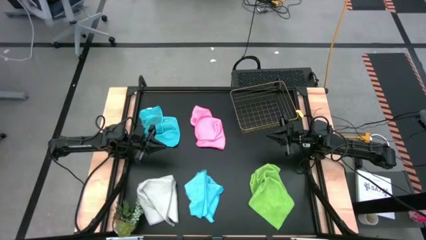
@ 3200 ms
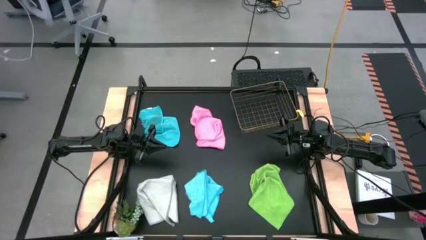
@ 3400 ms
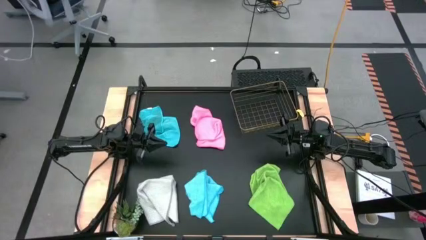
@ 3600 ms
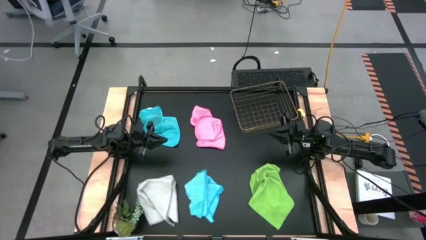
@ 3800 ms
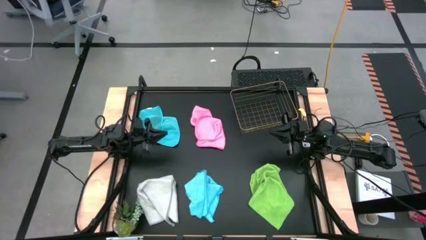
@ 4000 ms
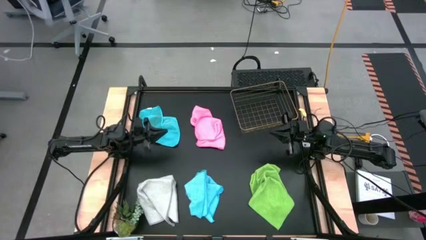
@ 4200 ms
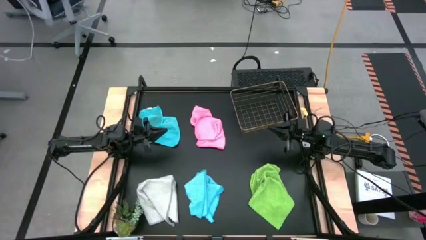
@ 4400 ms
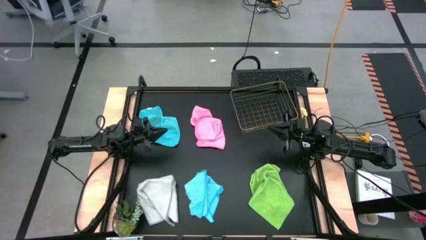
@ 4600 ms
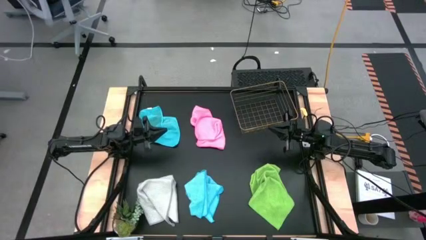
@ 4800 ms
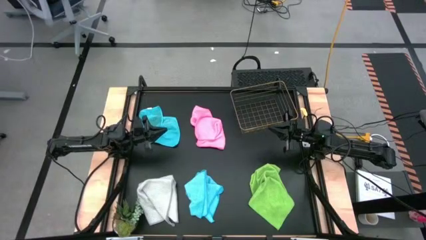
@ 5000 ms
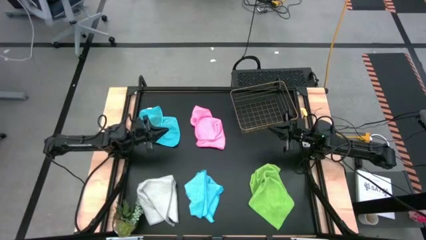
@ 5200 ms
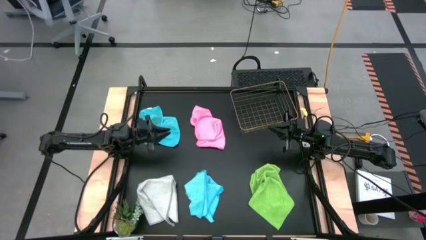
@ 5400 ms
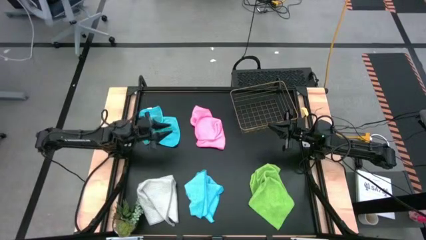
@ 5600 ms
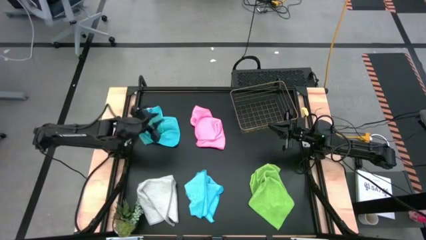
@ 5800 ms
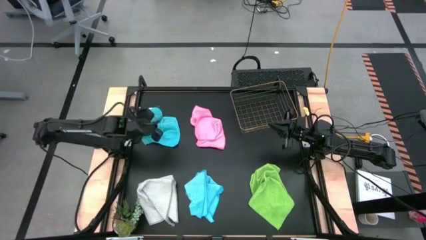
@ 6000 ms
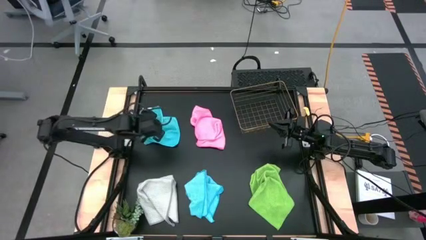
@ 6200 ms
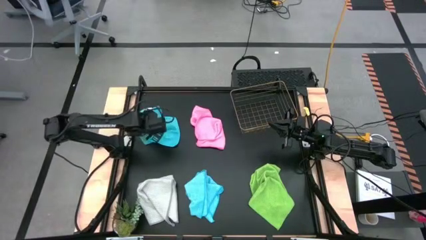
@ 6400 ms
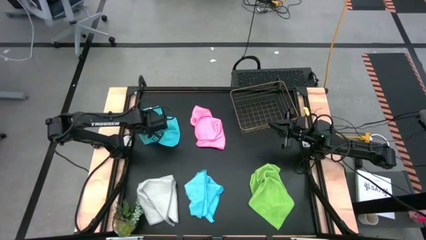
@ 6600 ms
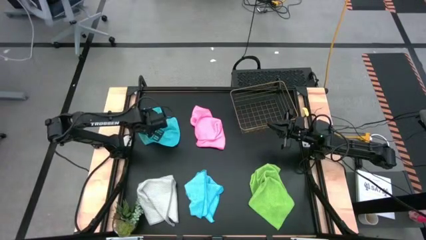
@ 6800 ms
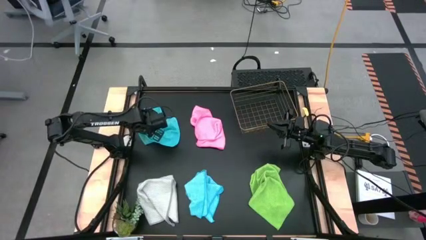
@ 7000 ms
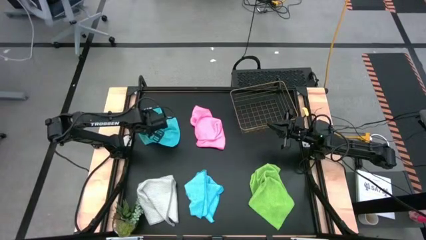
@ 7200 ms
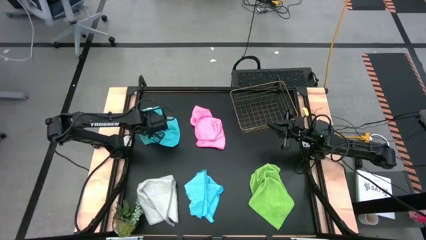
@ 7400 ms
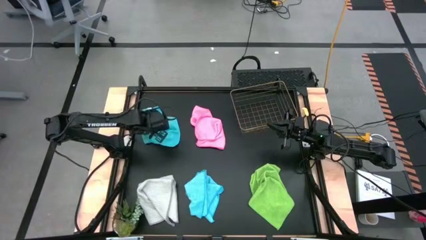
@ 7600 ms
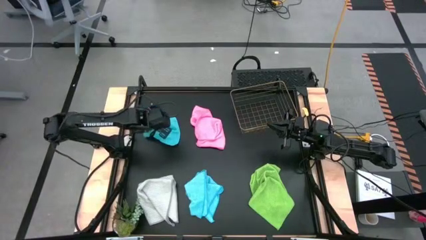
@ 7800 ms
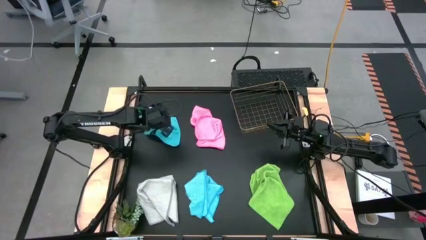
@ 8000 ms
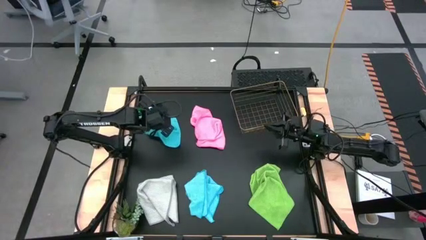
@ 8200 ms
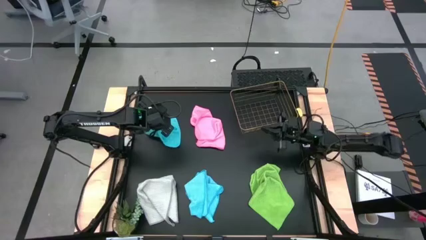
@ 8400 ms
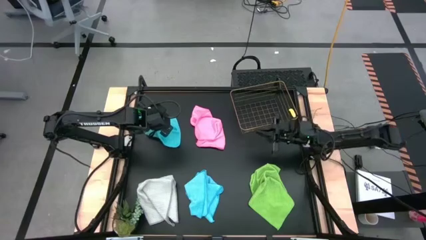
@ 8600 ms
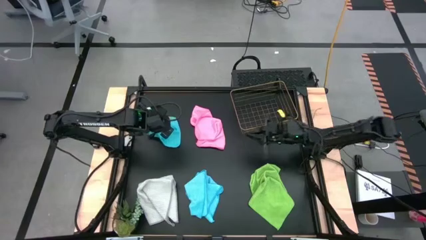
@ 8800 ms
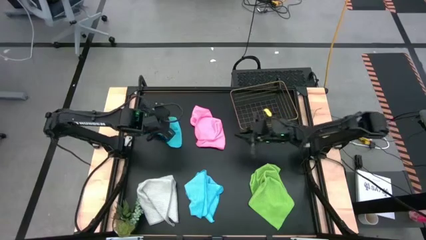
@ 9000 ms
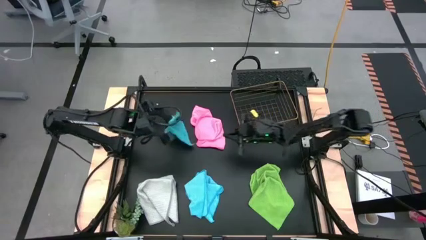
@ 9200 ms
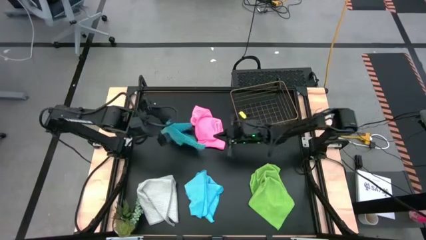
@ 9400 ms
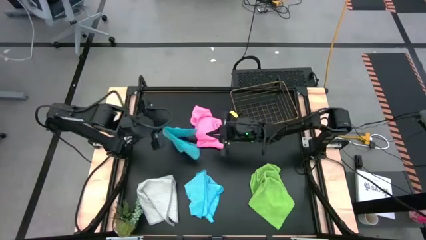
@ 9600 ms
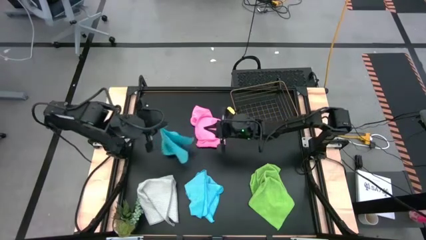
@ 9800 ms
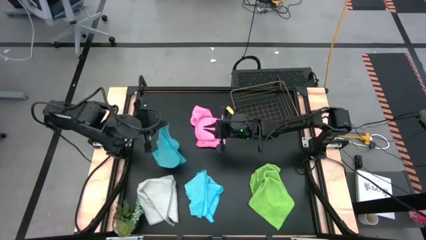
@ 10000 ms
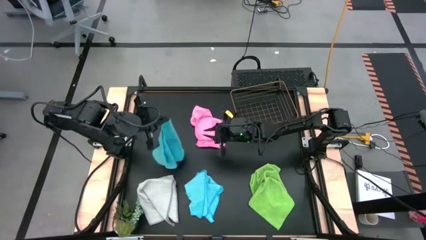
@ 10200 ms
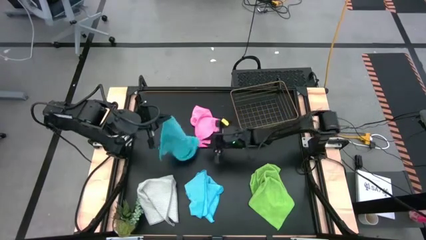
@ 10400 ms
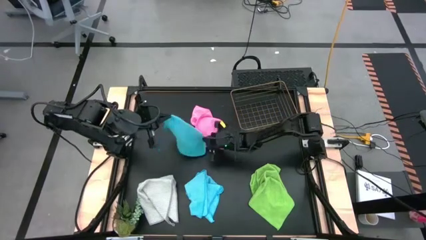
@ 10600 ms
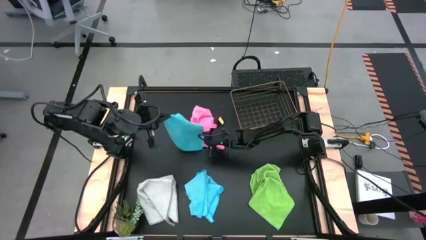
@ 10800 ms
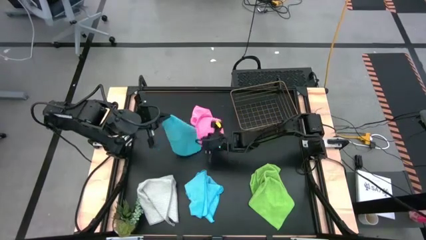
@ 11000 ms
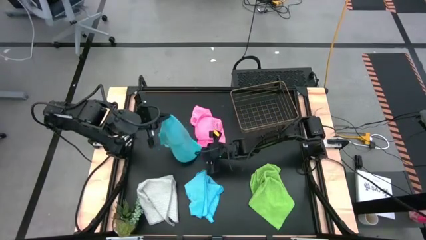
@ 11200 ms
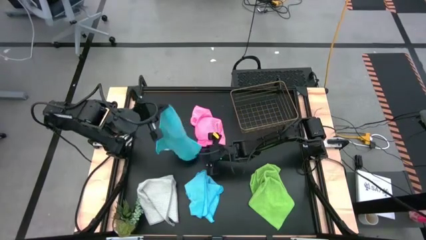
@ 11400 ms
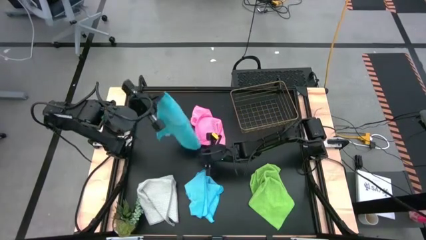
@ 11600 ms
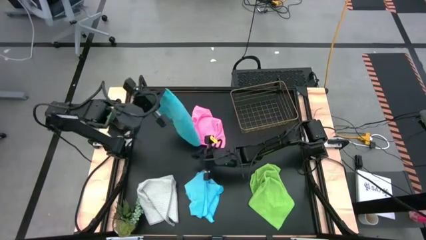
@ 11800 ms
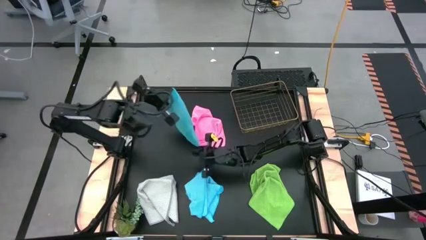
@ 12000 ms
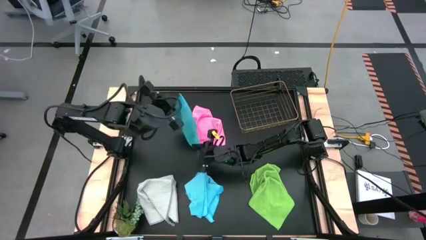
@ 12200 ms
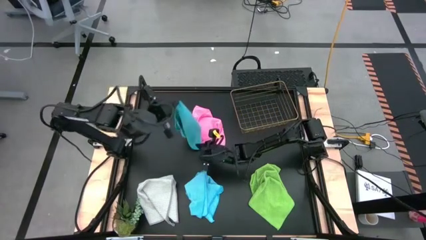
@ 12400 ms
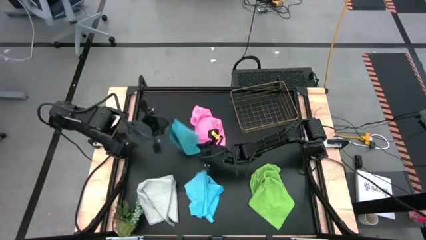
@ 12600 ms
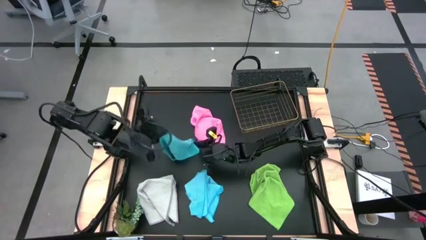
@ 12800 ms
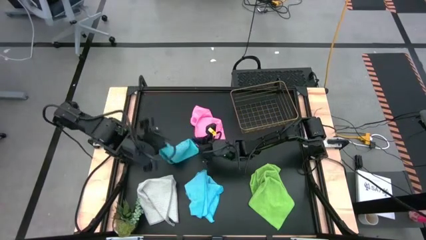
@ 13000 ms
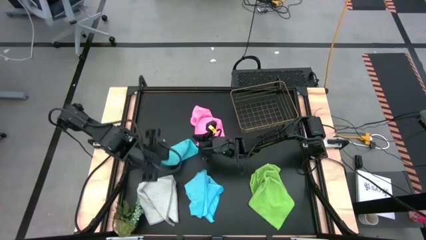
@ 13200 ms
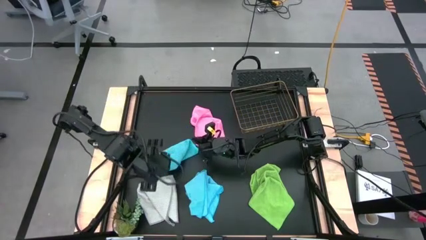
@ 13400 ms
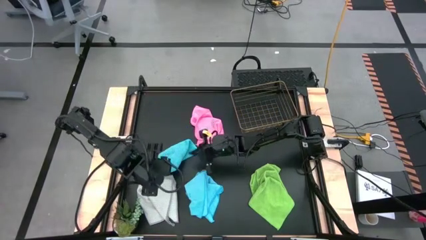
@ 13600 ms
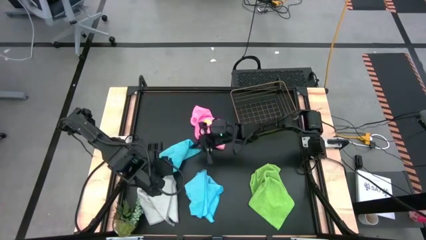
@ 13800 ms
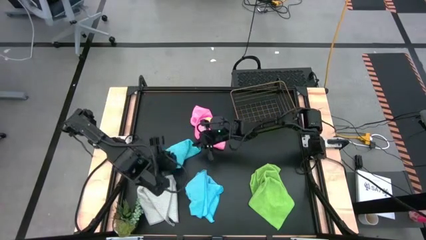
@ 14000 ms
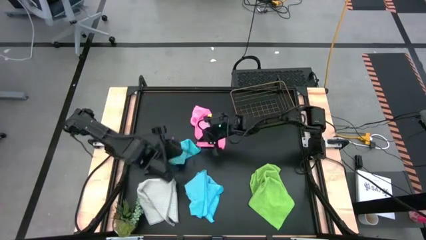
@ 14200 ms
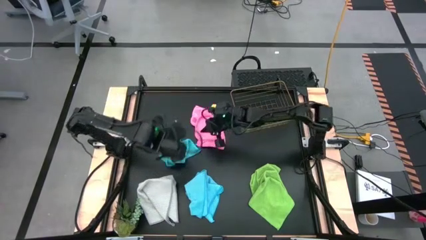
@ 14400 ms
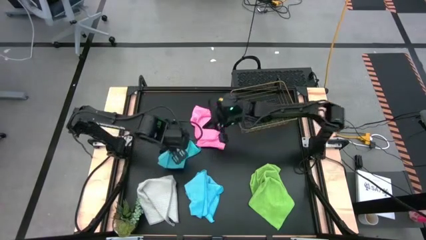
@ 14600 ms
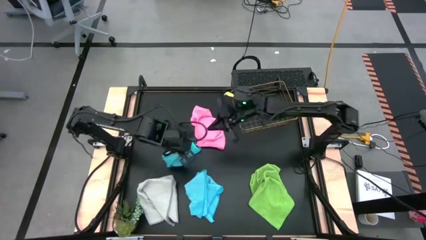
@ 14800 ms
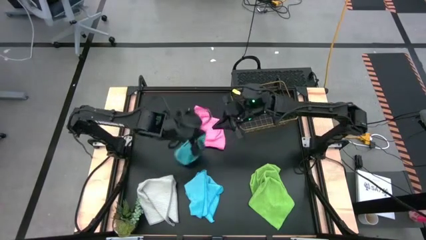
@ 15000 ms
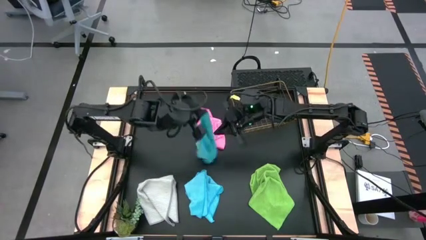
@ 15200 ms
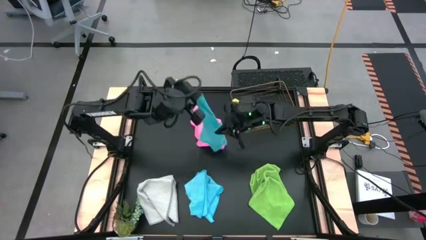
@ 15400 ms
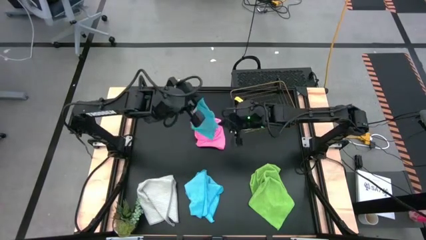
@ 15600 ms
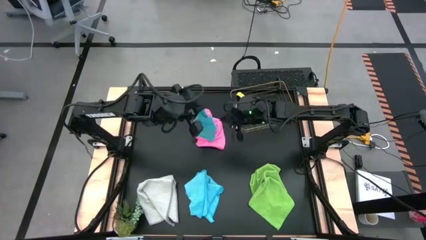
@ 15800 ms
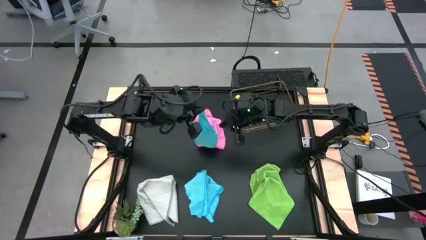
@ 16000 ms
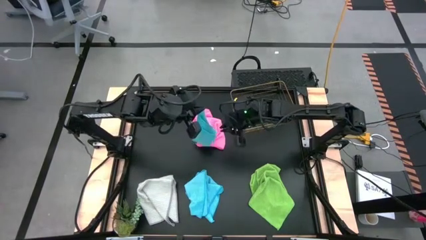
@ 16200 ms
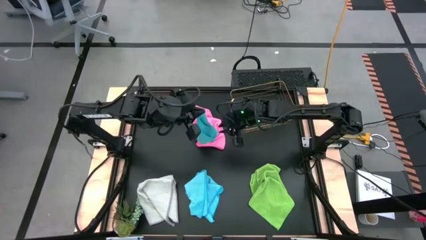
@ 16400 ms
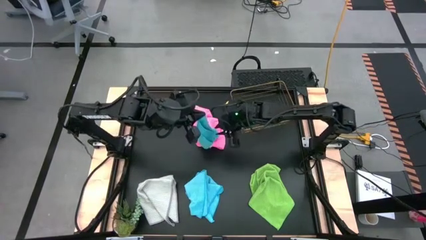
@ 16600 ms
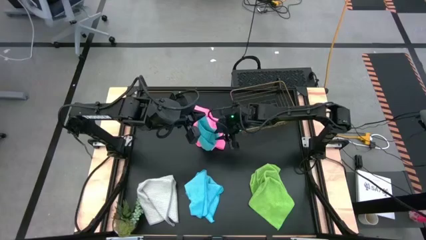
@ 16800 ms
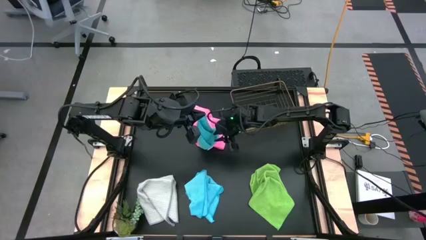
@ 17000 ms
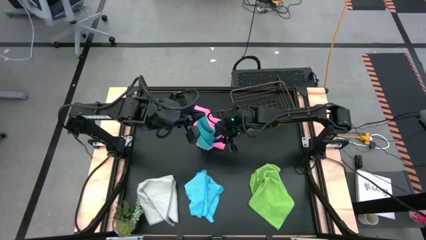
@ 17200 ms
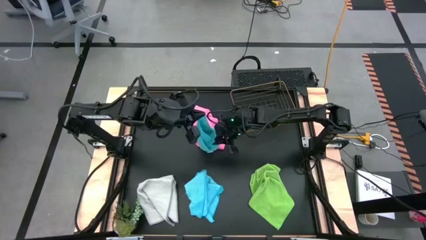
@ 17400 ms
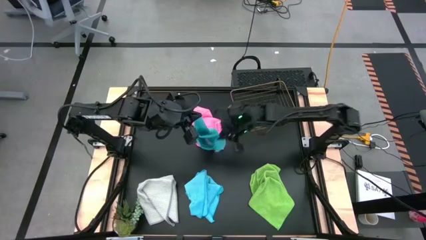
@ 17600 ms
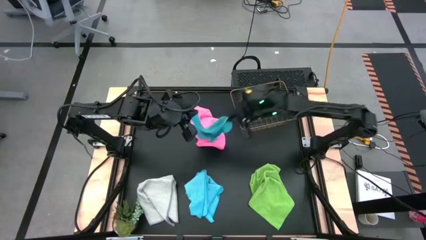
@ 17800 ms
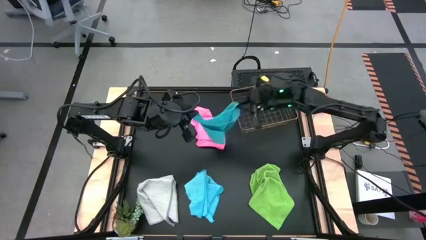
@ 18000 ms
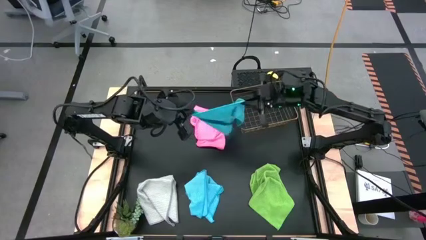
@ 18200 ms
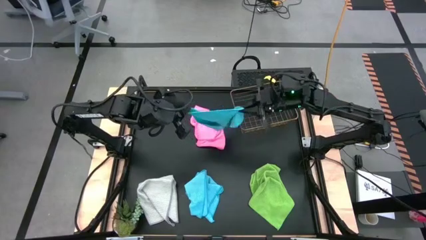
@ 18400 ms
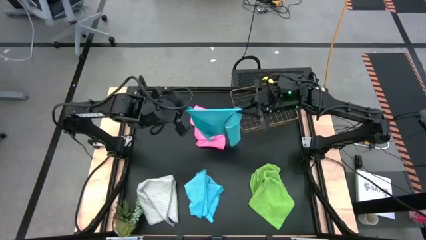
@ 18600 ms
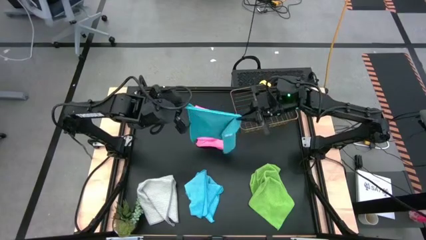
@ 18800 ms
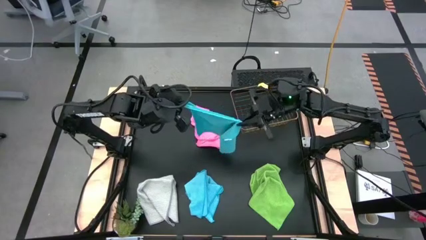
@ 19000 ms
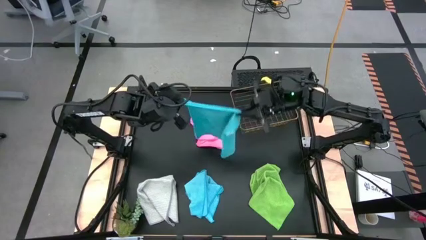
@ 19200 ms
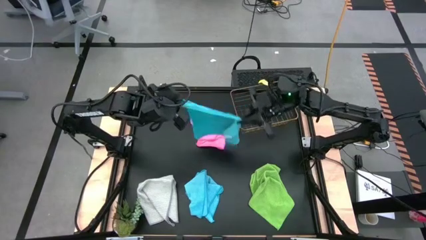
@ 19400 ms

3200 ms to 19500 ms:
Task: Fold microfiber towels
Fold the top blue towel
